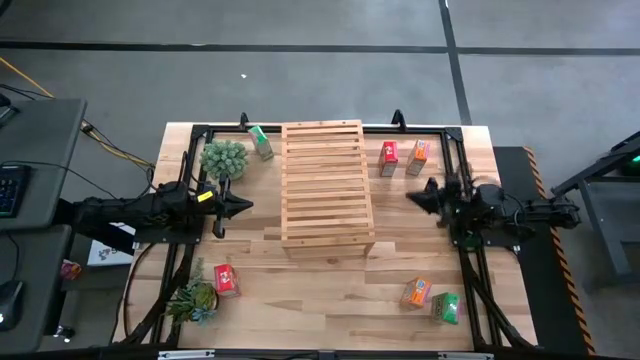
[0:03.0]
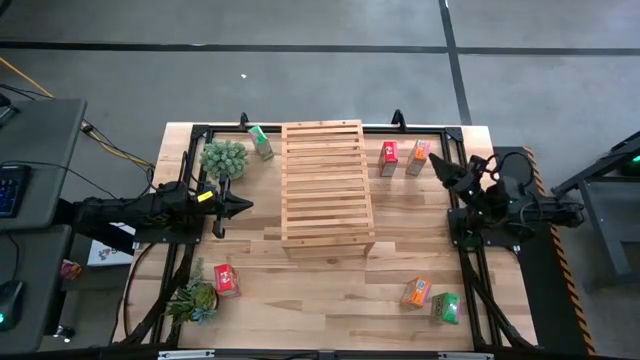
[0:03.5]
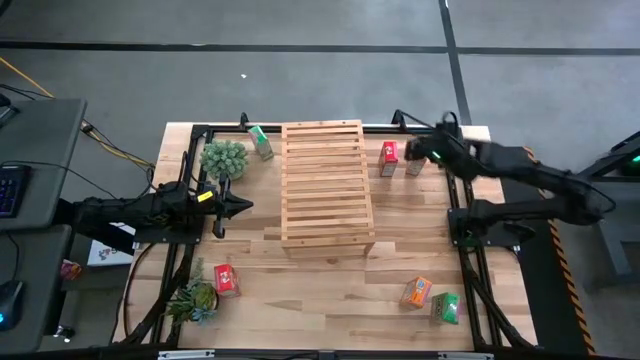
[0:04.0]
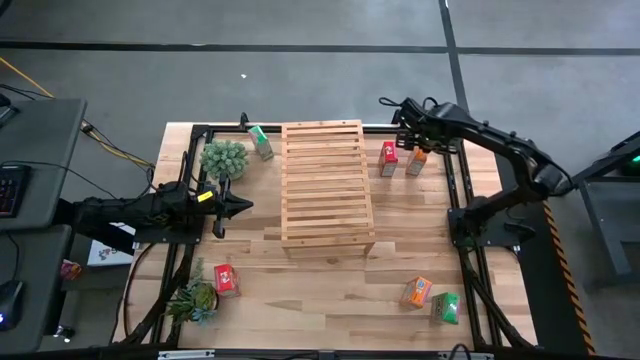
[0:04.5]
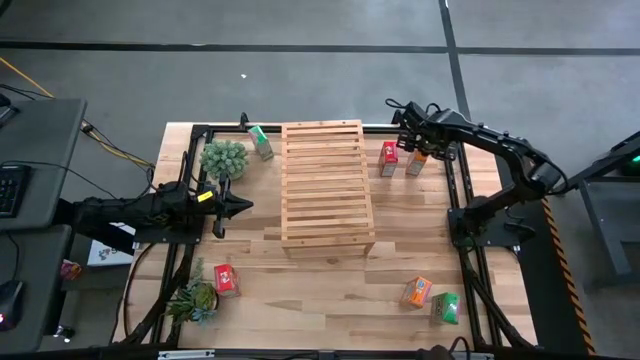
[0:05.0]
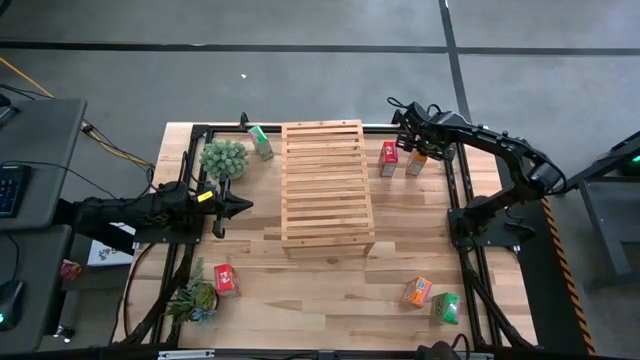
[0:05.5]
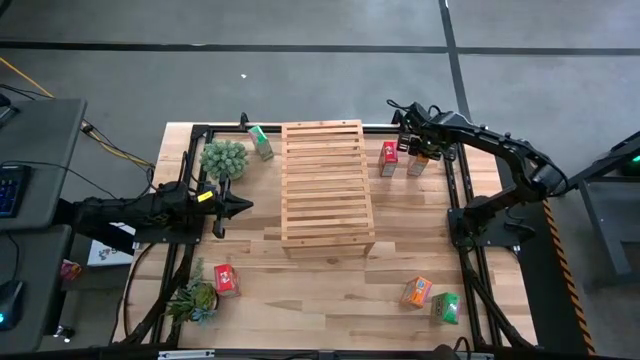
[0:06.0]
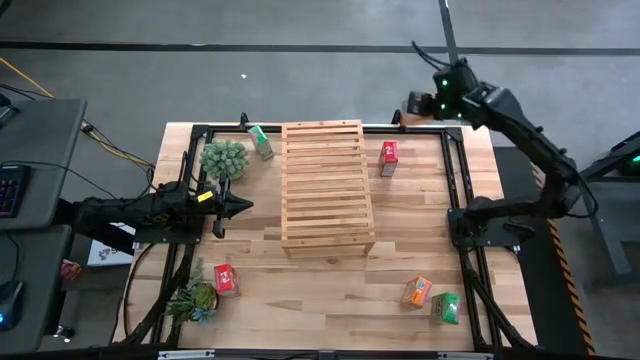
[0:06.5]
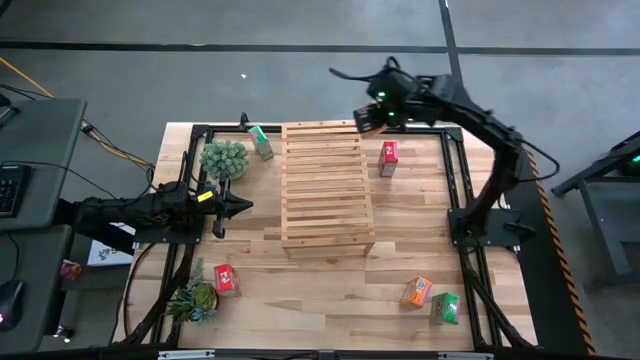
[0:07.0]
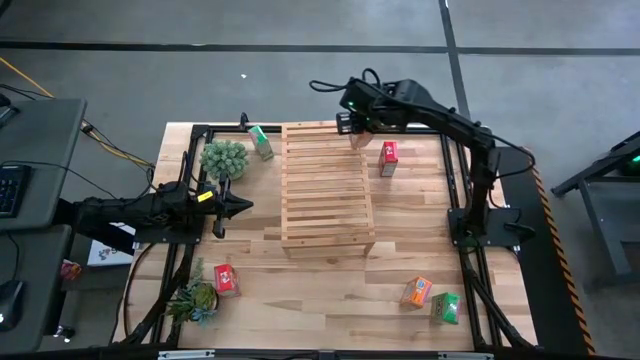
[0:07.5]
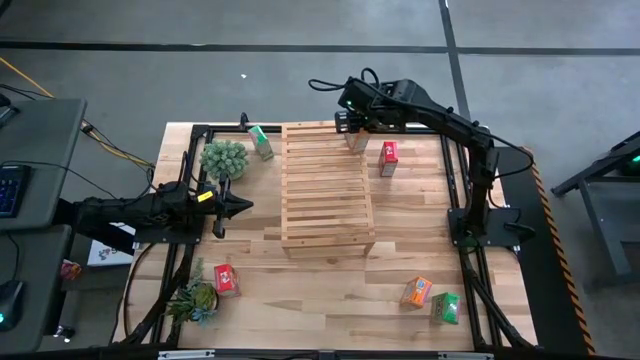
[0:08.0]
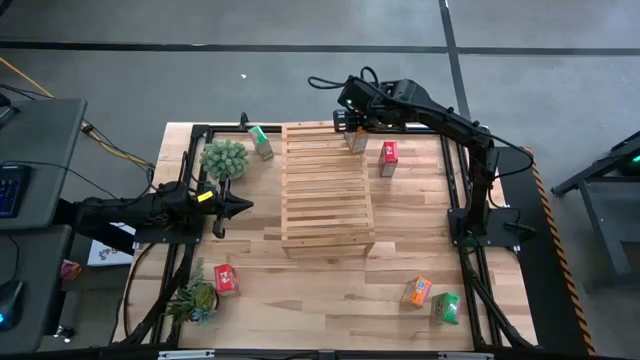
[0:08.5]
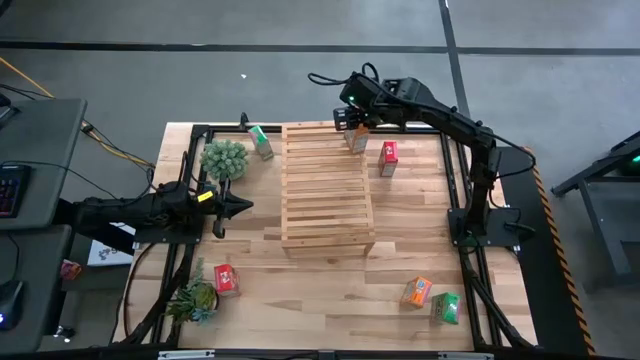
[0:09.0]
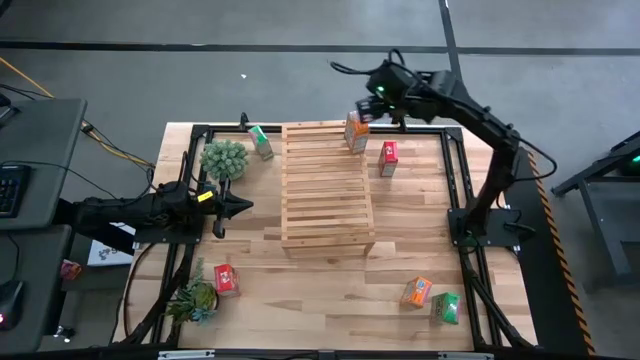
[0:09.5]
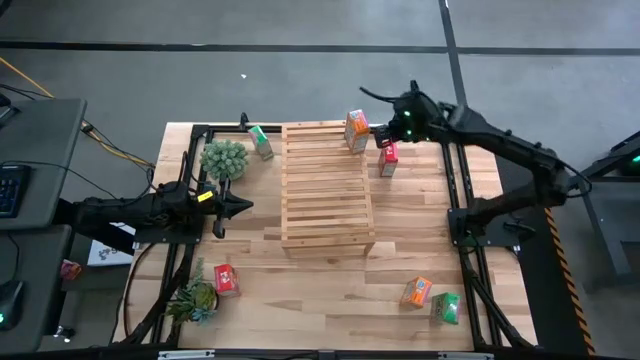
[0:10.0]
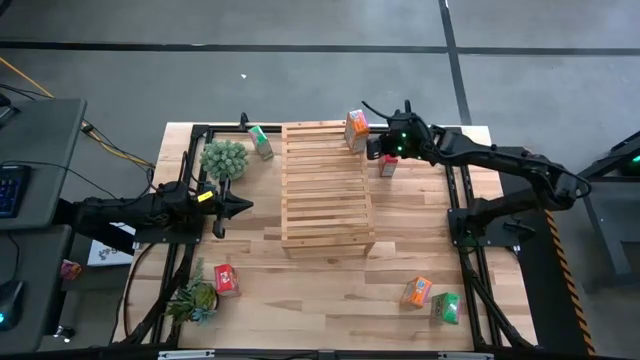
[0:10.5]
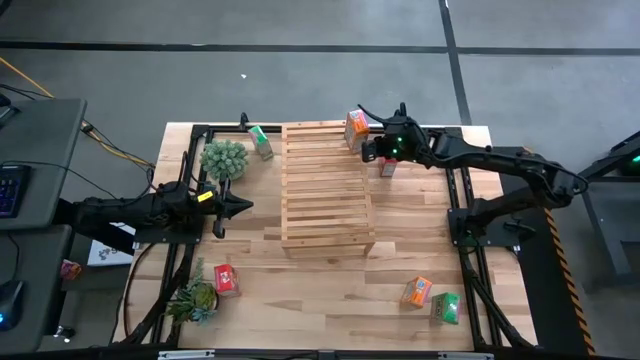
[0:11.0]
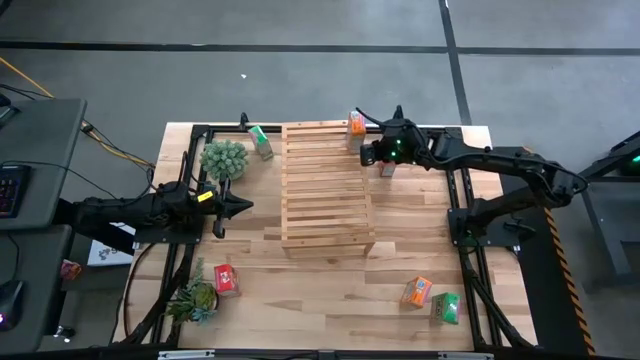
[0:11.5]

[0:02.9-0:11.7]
Task: Stack cereal on shelf
Put the top orange cereal box on the shelf

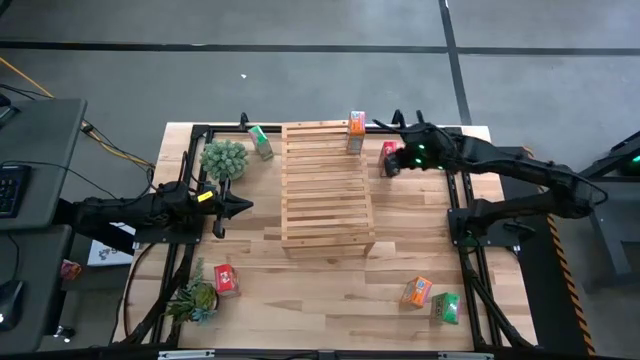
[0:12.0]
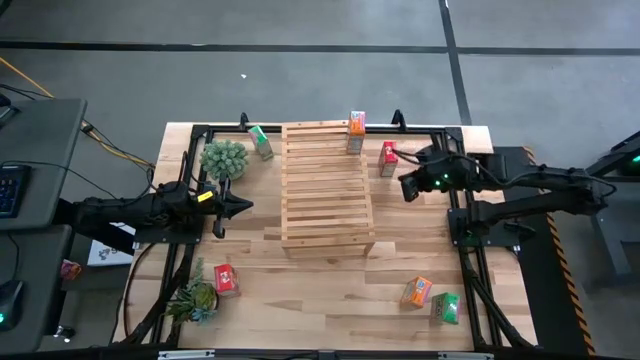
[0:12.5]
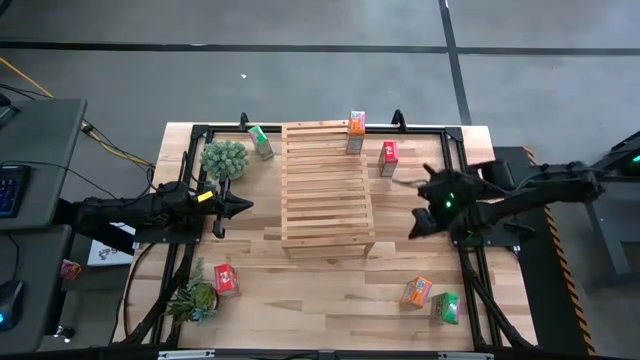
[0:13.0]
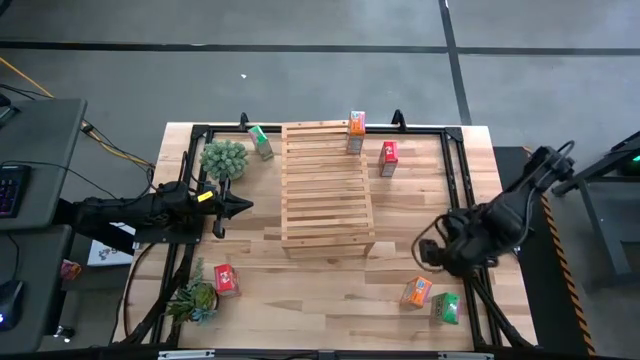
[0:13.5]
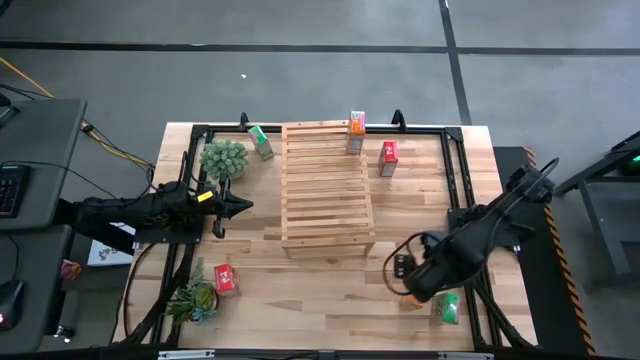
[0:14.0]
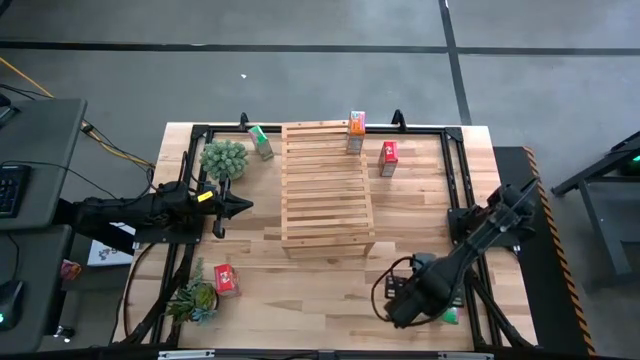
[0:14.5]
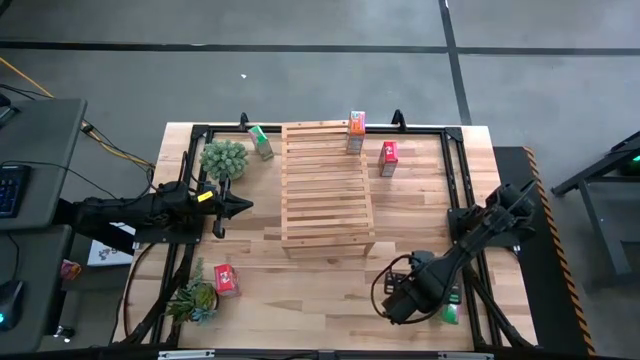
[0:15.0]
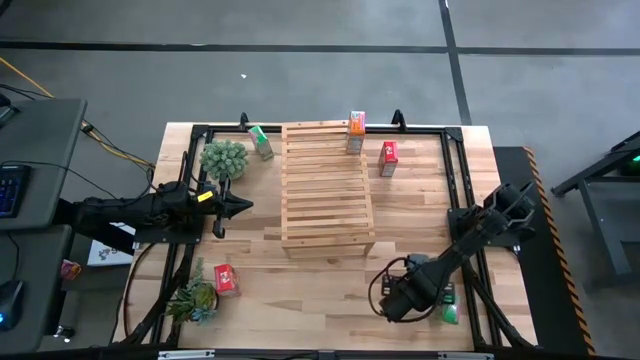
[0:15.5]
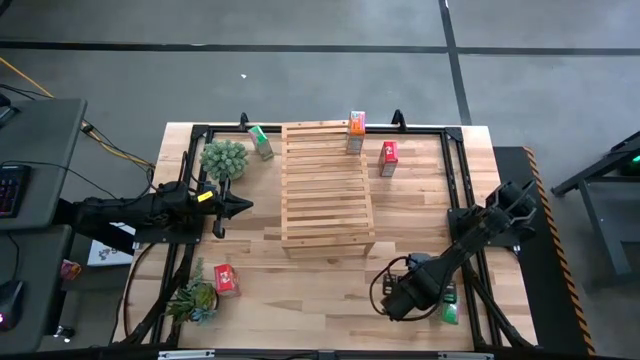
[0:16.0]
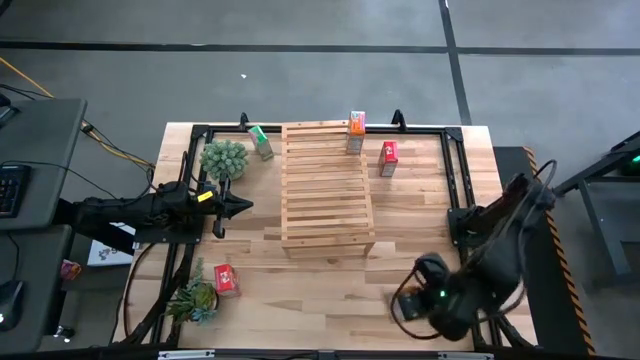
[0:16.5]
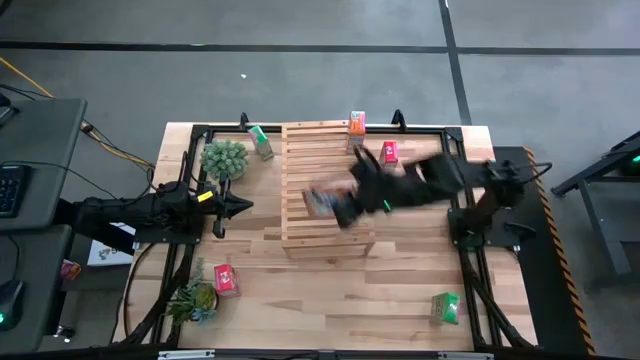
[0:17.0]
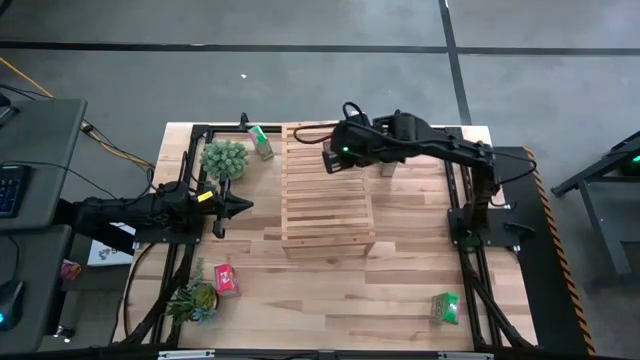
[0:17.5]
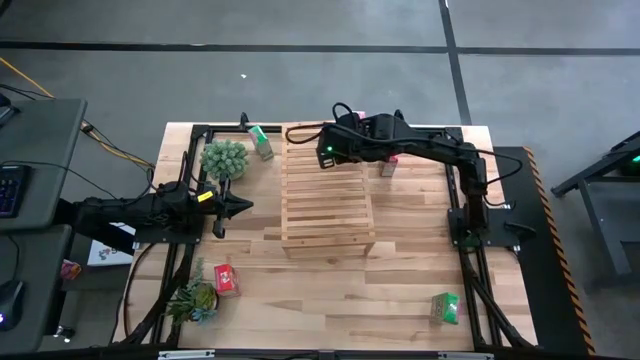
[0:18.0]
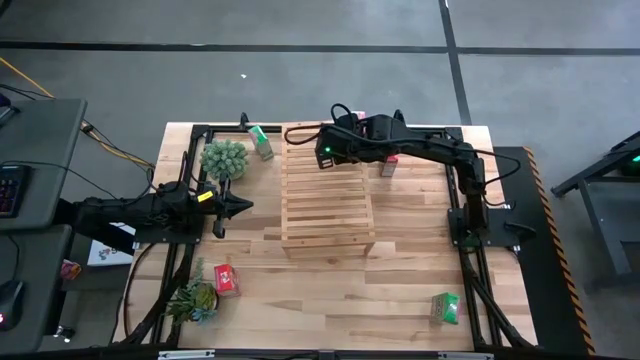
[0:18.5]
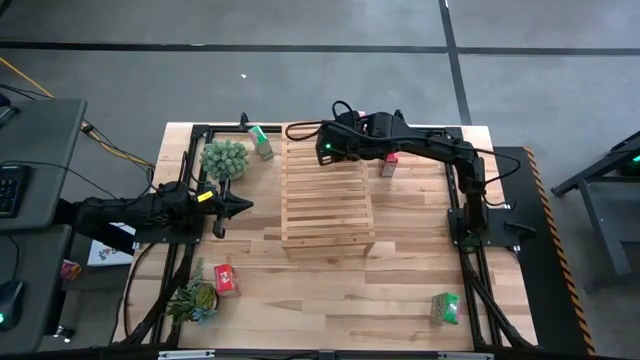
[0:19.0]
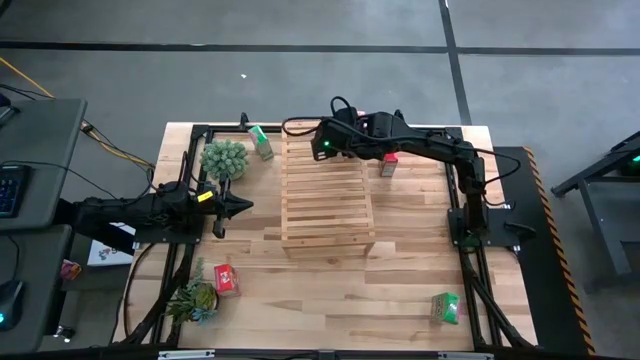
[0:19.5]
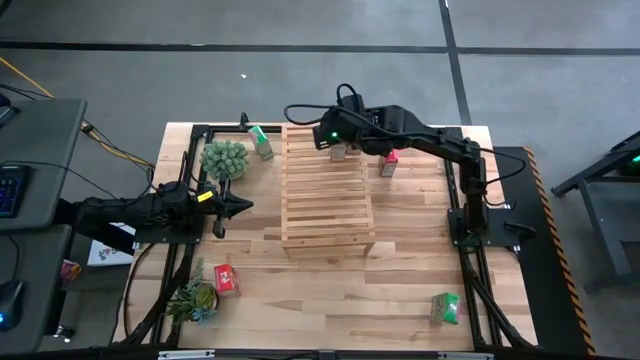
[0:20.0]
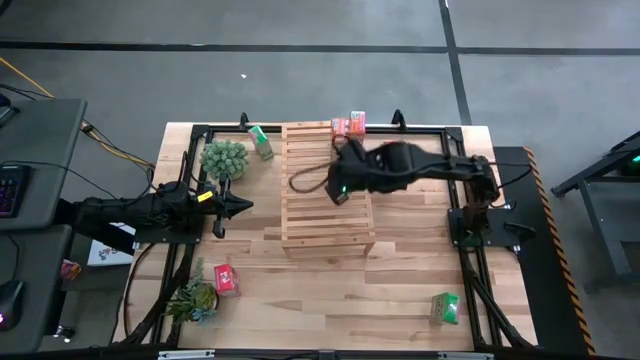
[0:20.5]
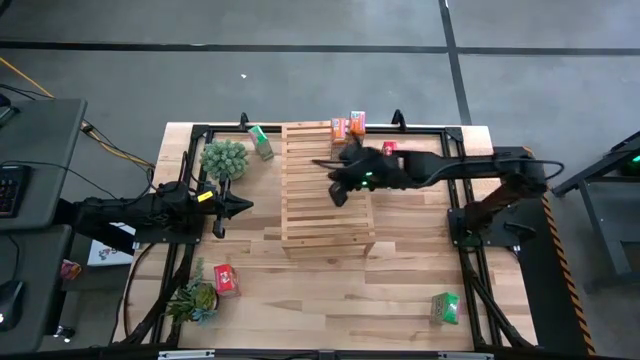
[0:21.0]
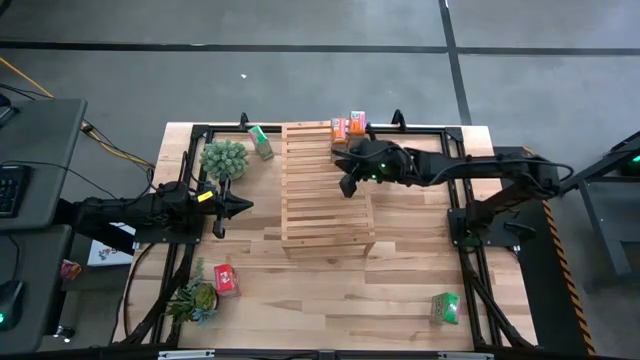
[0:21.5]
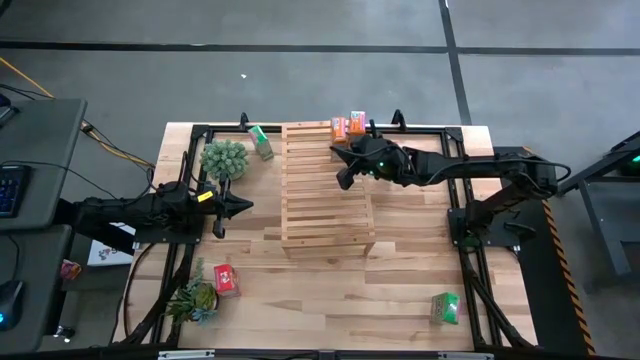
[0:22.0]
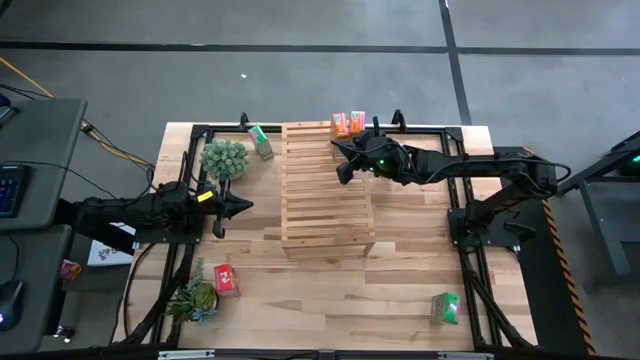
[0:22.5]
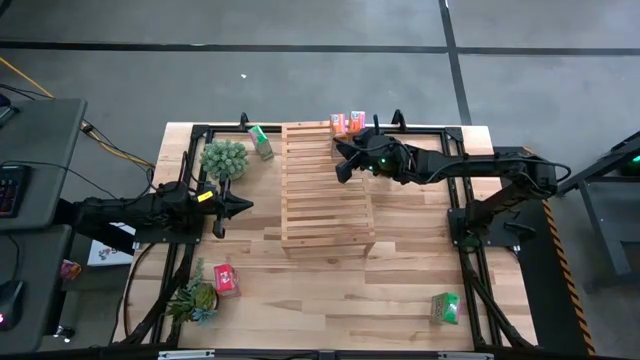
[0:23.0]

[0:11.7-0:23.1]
Put the orange cereal box on the shelf aligned with the other orange cereal box

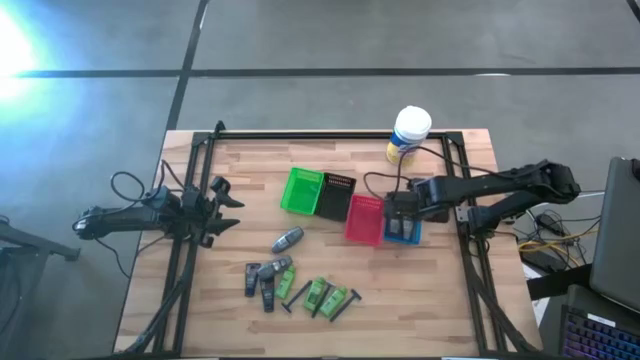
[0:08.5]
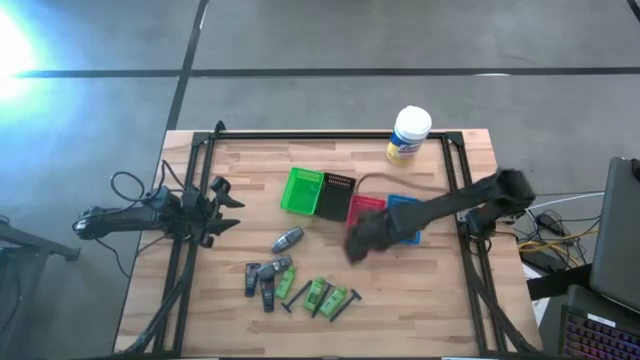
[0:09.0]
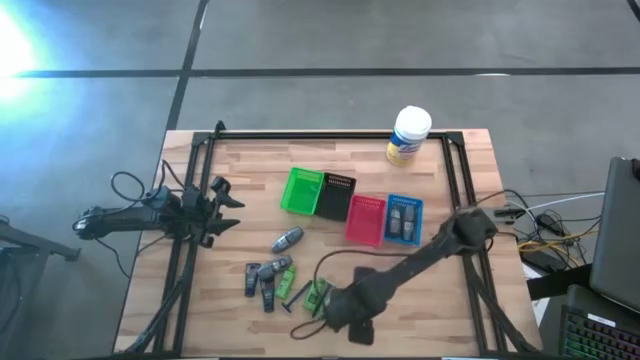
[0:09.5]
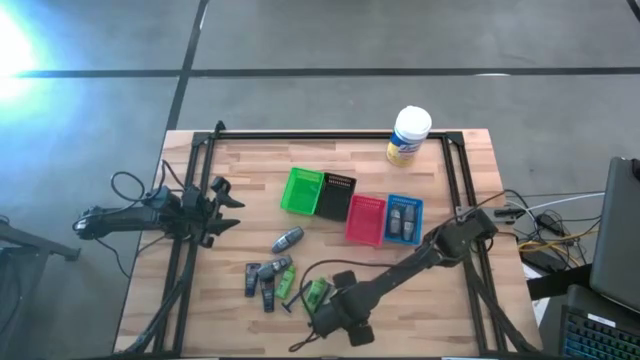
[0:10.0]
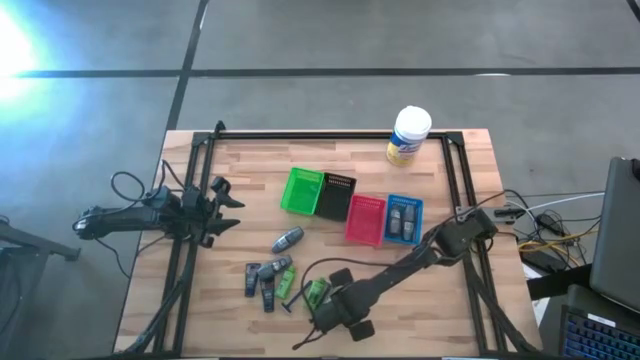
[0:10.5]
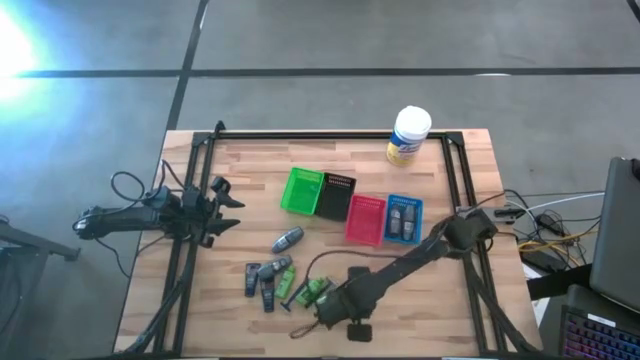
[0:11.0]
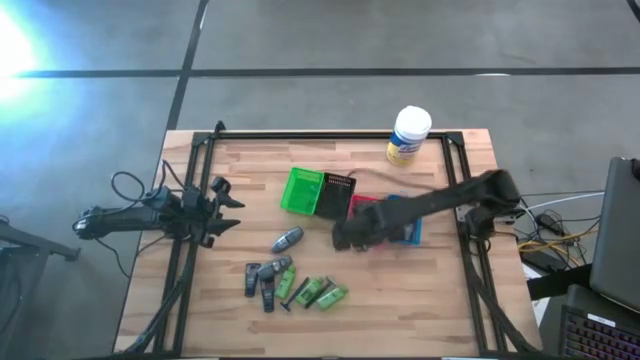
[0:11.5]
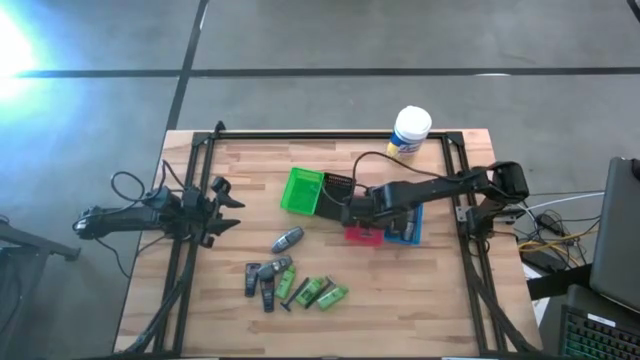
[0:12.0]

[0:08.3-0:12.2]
Task: Pick & Place Travel size toiletries
Put the razor into the red bin
